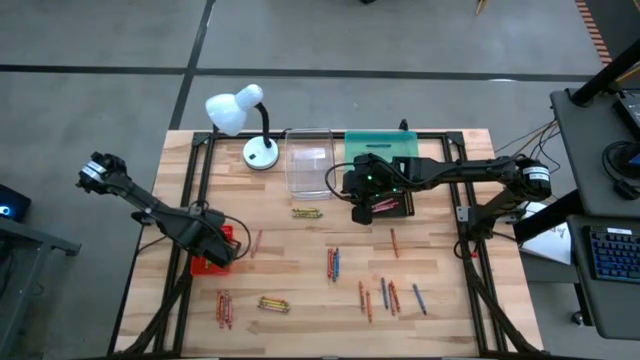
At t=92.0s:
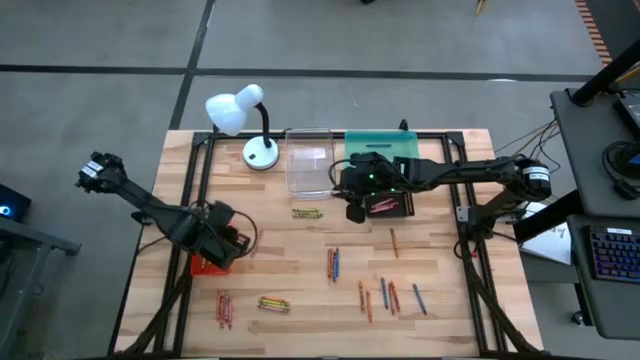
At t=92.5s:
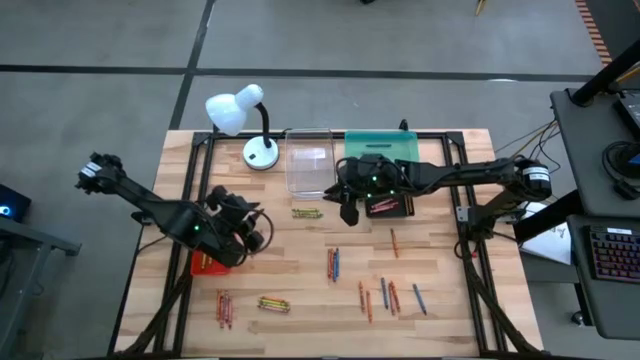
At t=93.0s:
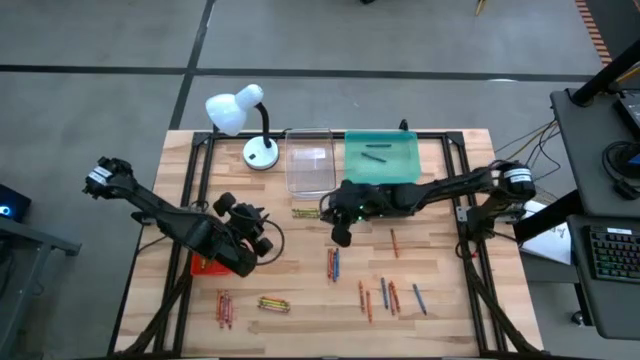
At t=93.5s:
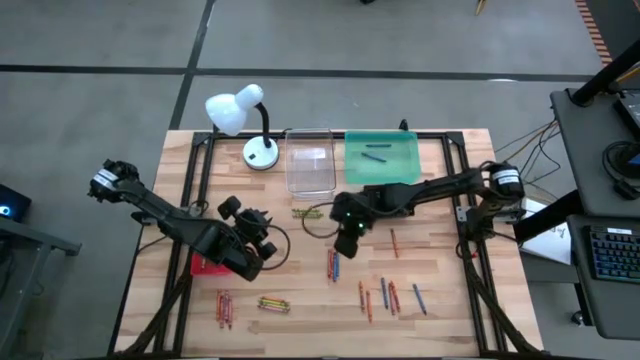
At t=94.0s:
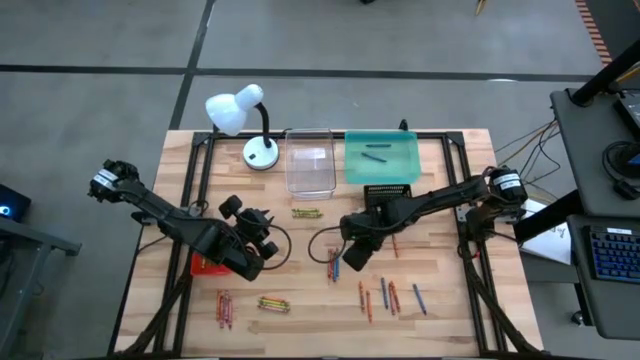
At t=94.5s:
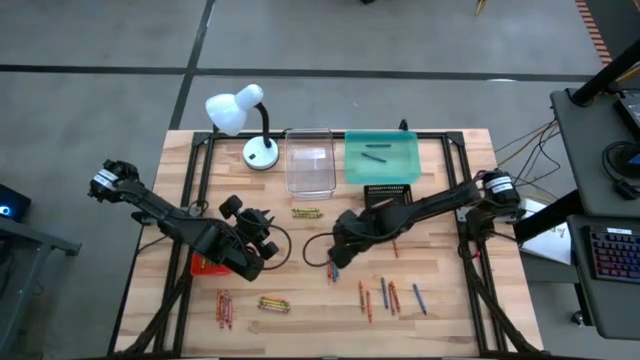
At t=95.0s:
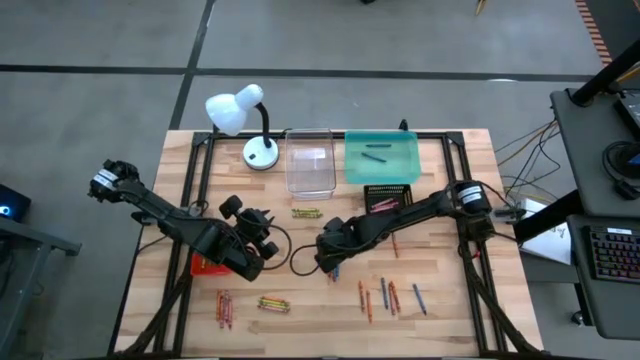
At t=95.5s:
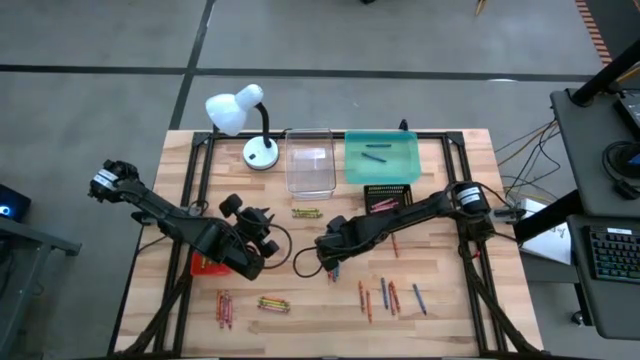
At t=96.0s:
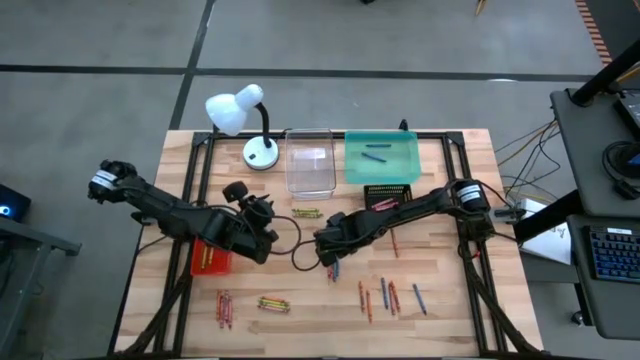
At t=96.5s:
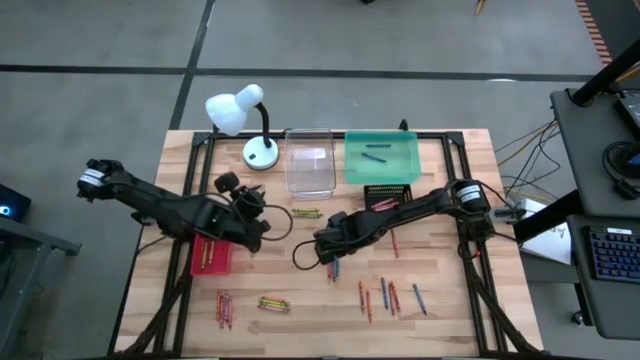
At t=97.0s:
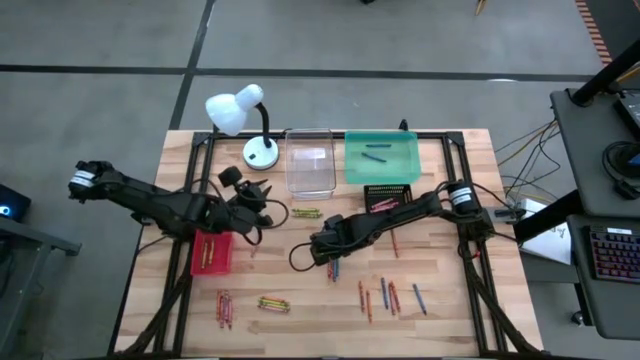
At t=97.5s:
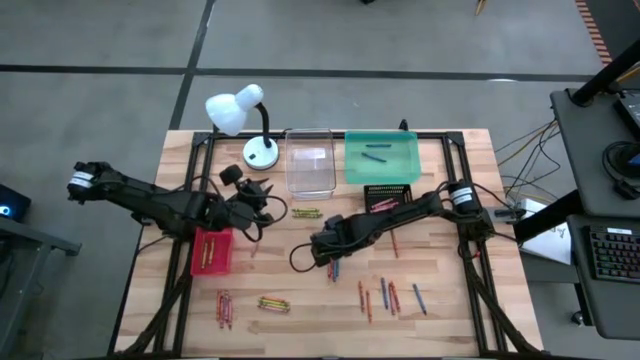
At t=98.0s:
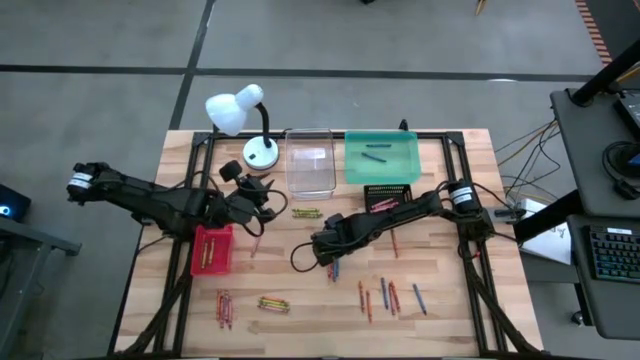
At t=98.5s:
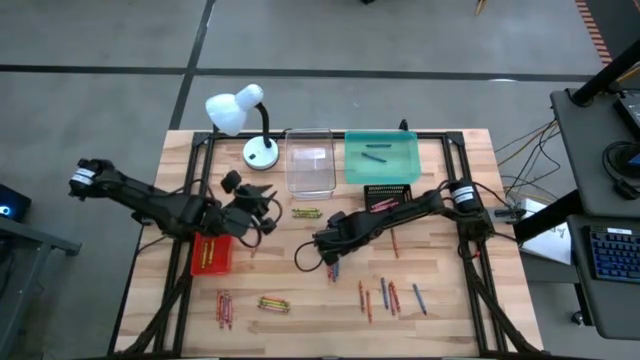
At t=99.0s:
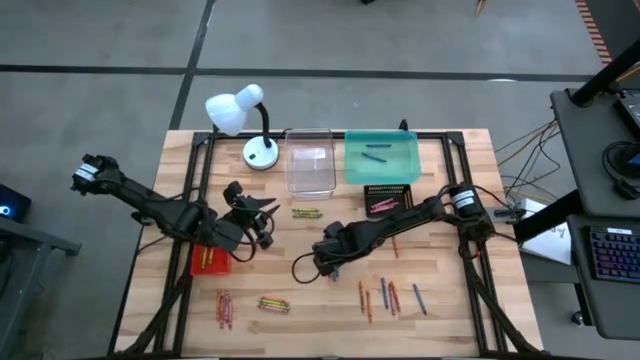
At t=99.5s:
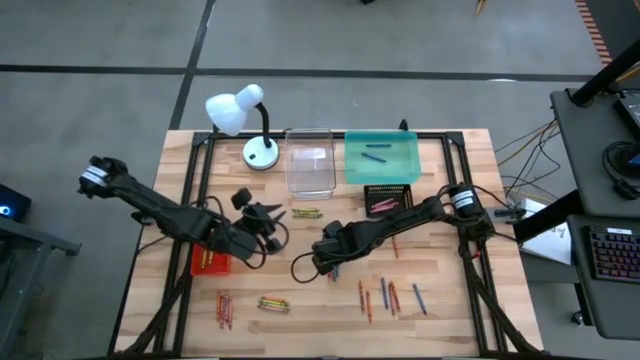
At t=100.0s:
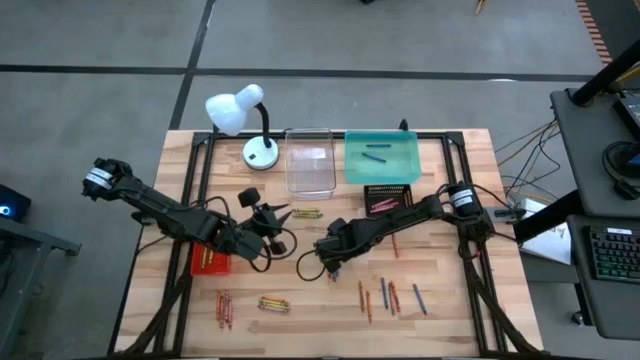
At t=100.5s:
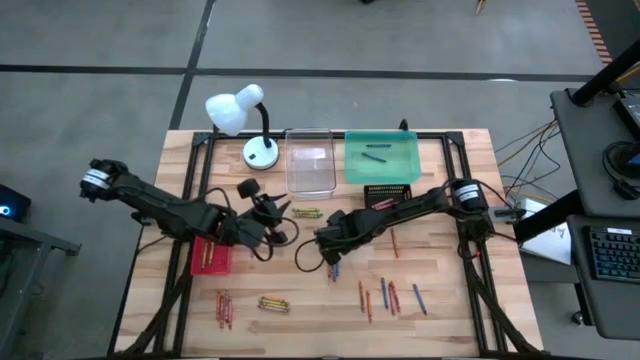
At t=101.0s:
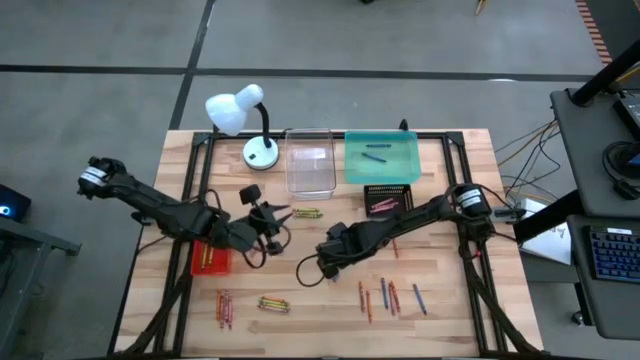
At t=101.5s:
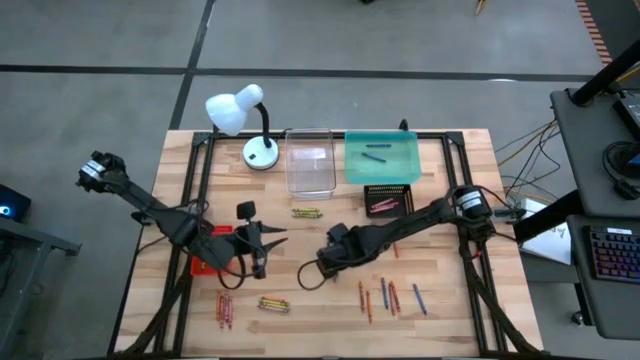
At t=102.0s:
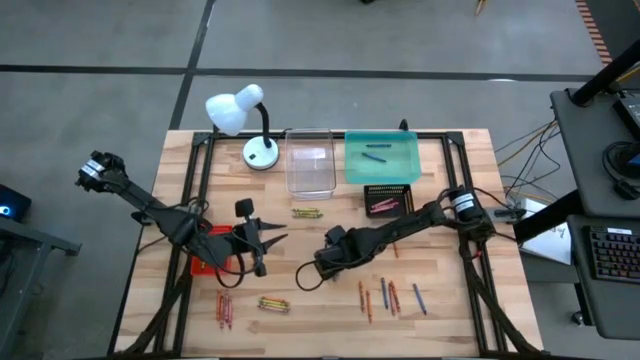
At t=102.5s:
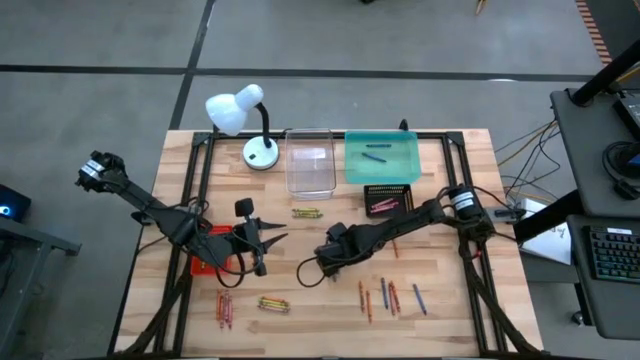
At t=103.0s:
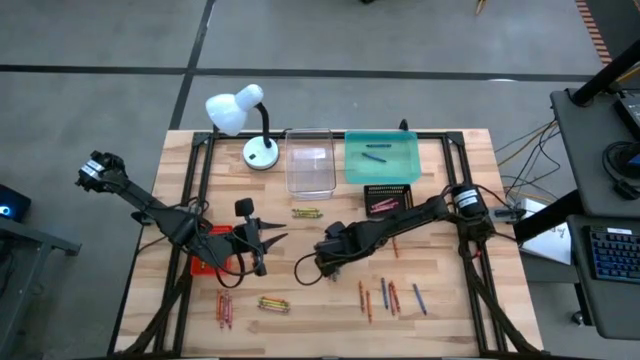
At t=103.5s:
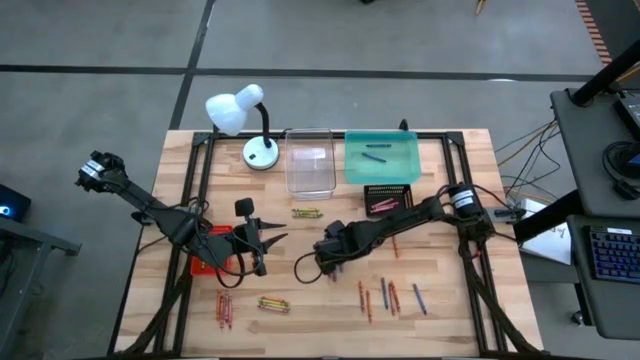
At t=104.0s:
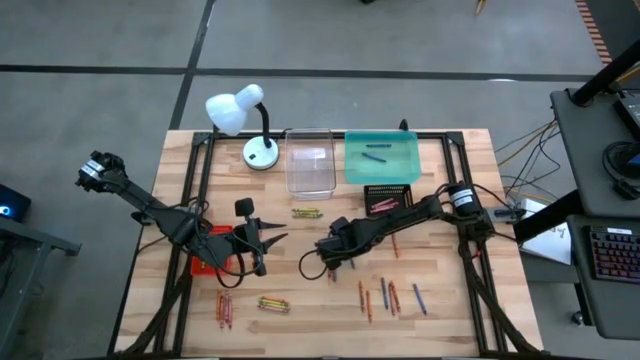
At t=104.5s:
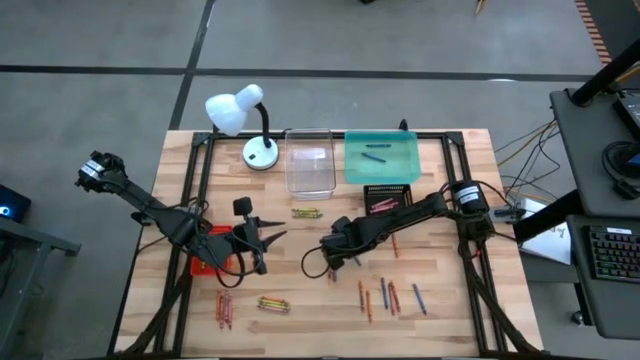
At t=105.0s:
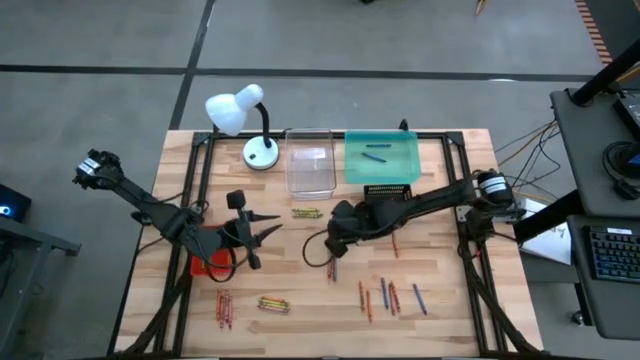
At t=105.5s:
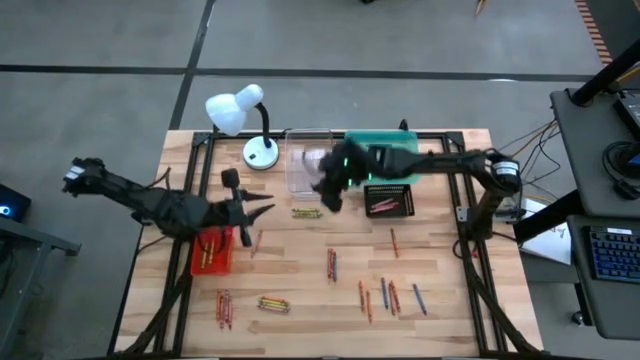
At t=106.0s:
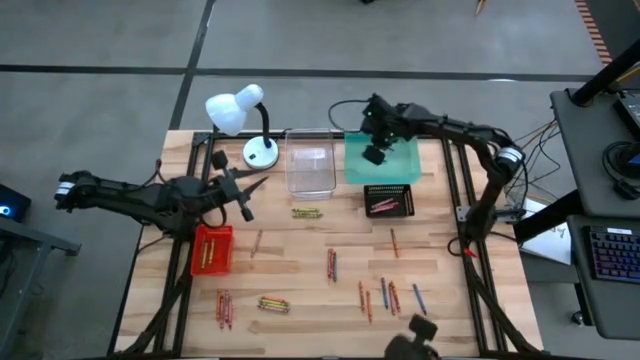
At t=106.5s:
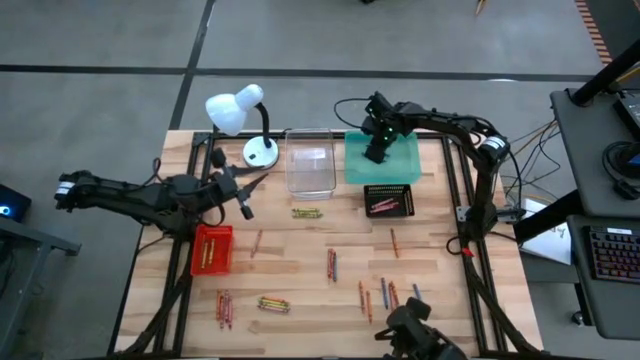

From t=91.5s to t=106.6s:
Task: Sort crayons
Put the blue crayon into the blue bin

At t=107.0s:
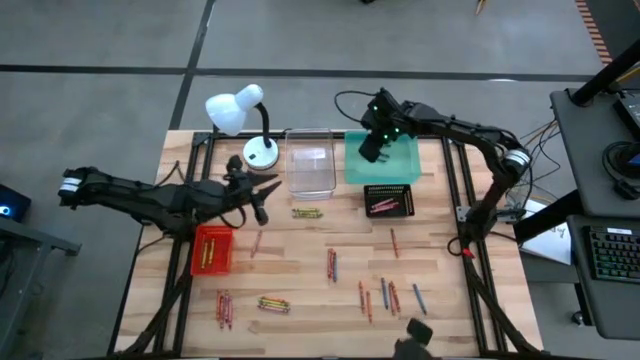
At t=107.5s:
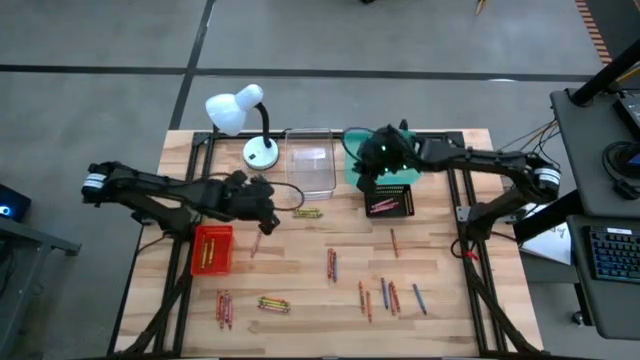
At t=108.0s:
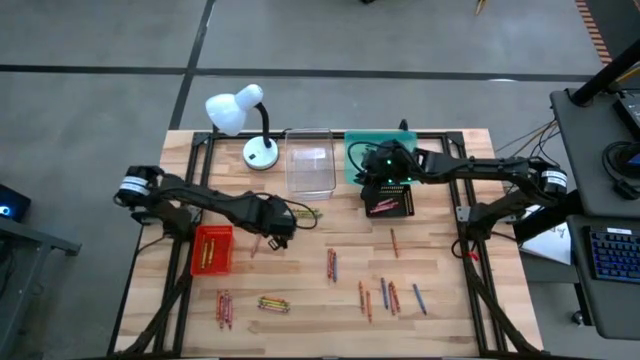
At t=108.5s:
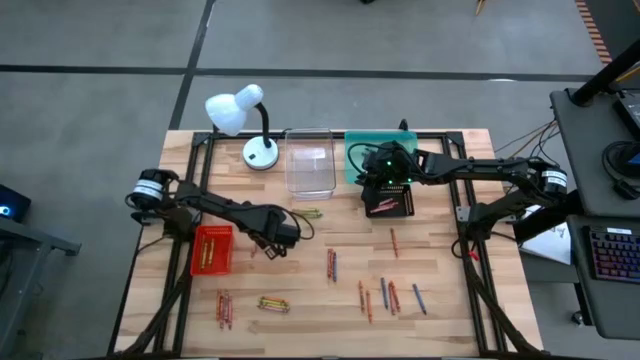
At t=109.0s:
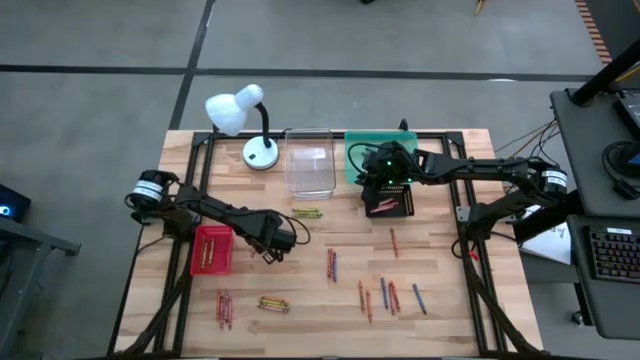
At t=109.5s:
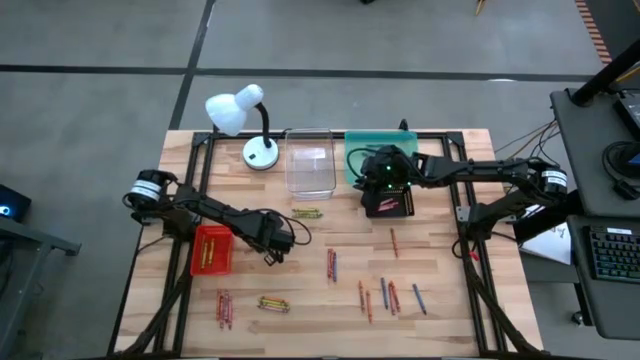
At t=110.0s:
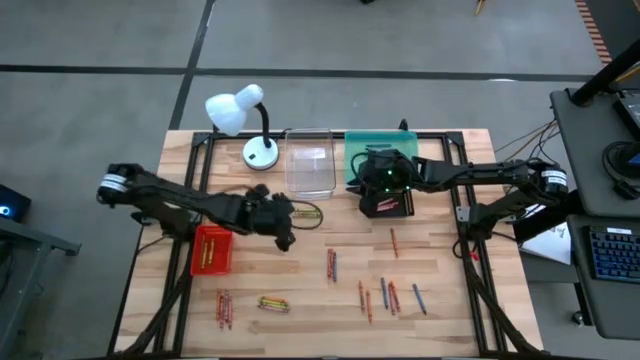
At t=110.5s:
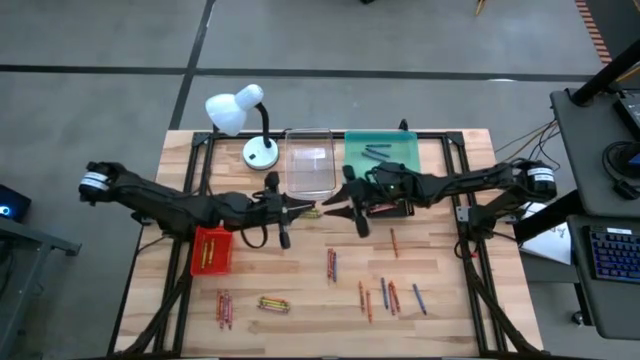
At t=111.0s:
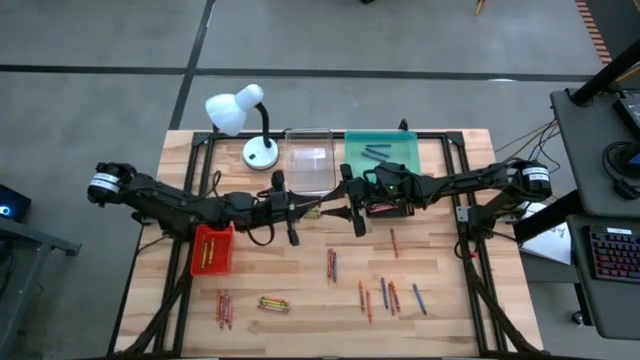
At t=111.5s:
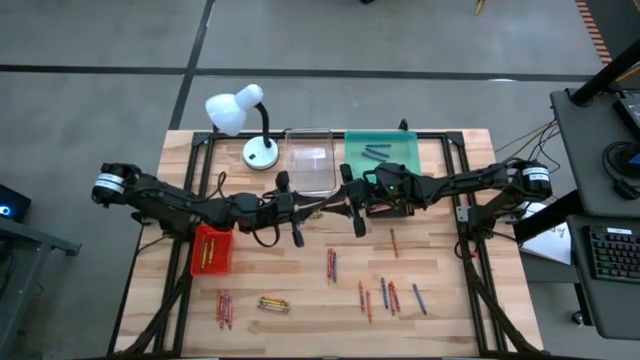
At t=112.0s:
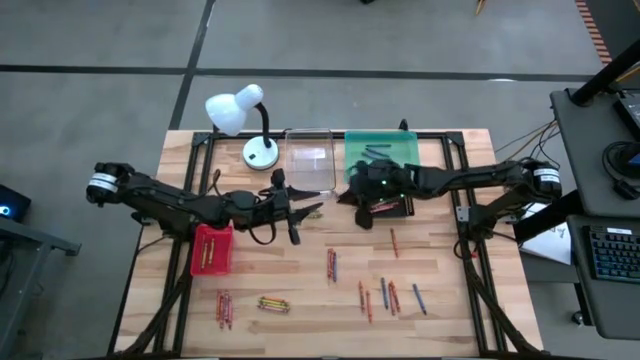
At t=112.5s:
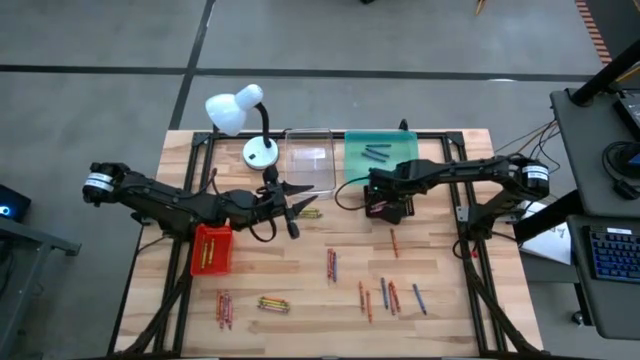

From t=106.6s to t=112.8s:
Put the red crayon into the black bin
